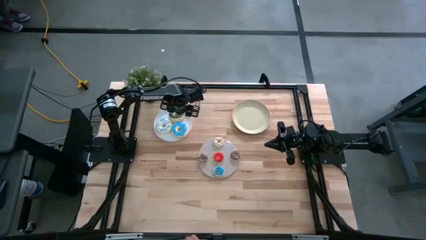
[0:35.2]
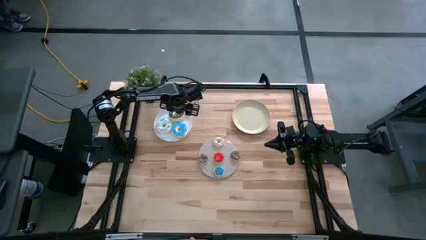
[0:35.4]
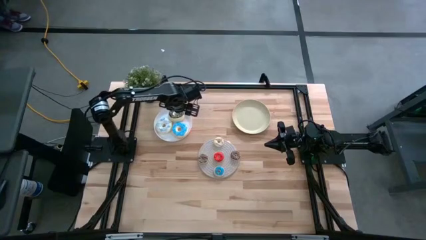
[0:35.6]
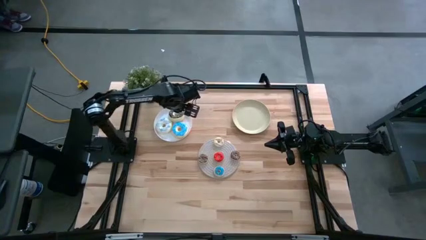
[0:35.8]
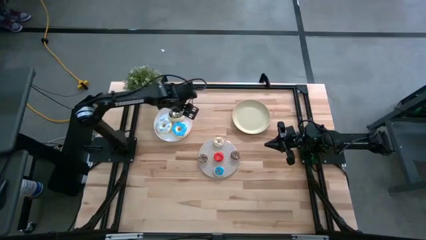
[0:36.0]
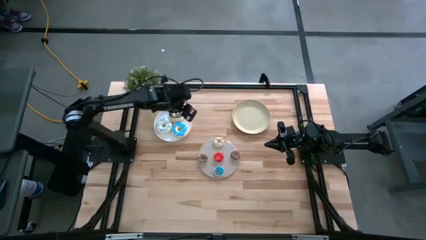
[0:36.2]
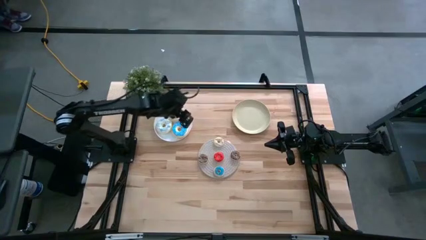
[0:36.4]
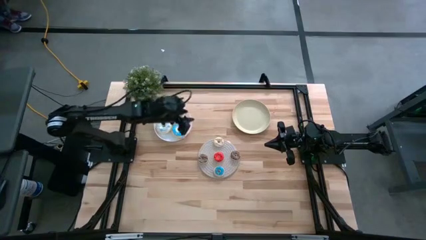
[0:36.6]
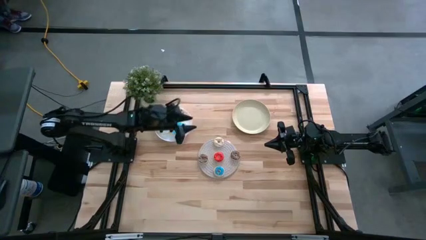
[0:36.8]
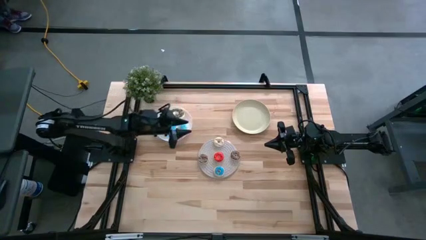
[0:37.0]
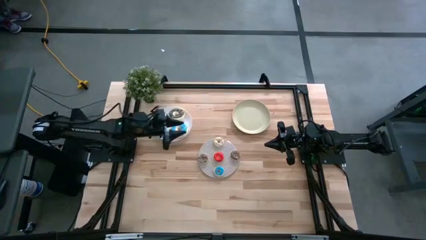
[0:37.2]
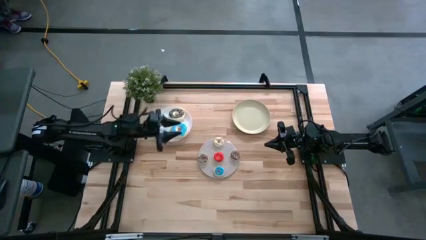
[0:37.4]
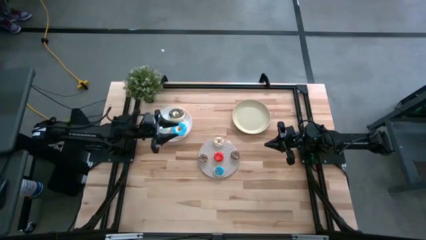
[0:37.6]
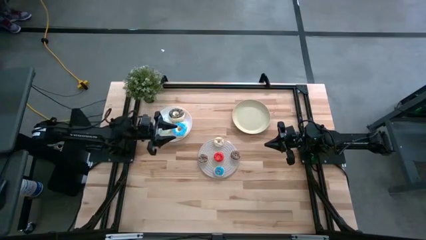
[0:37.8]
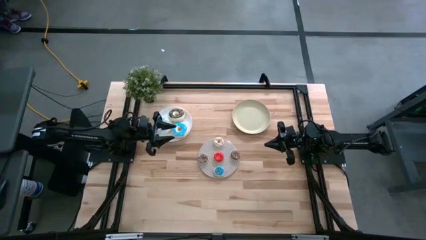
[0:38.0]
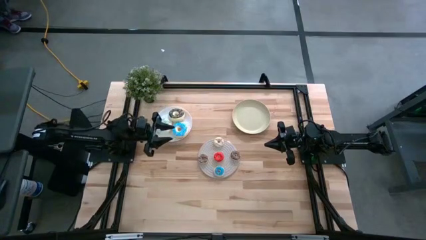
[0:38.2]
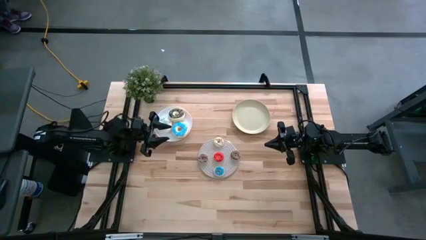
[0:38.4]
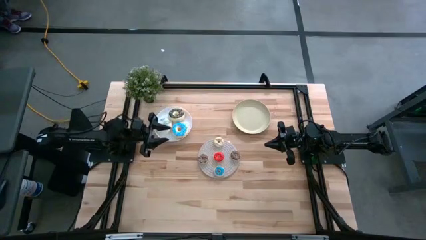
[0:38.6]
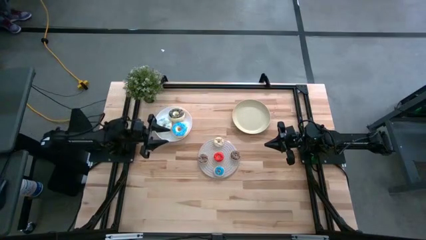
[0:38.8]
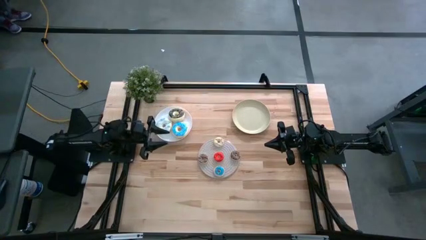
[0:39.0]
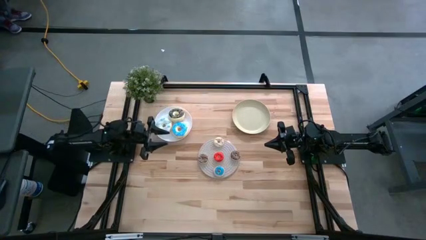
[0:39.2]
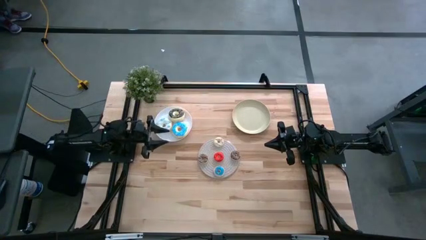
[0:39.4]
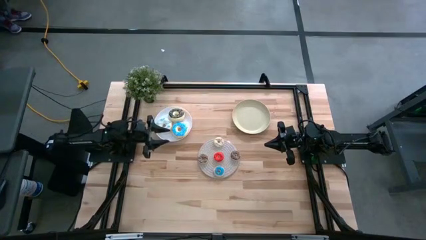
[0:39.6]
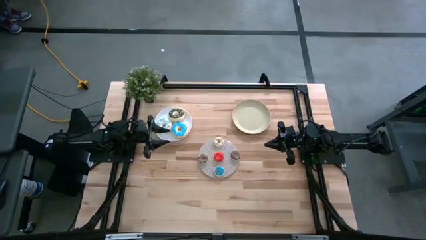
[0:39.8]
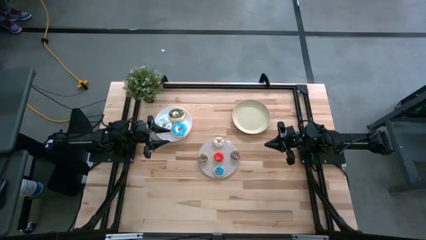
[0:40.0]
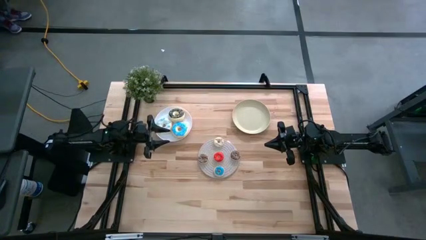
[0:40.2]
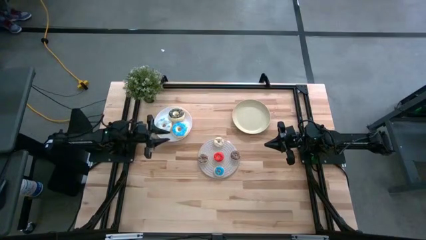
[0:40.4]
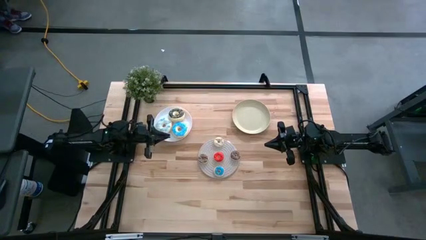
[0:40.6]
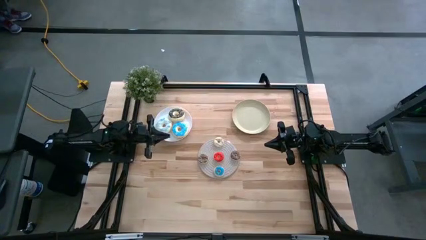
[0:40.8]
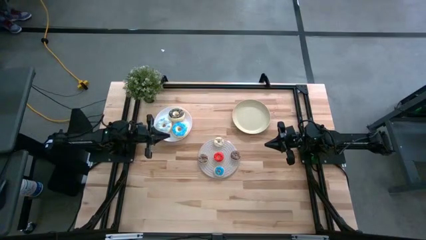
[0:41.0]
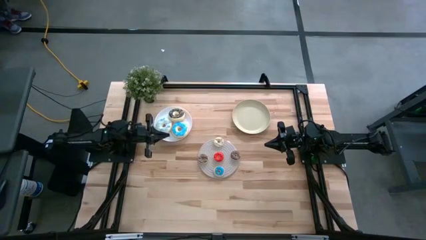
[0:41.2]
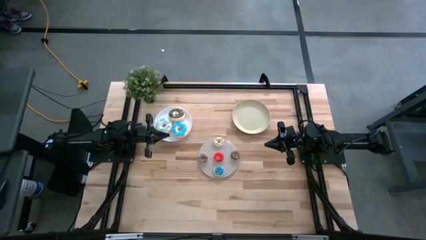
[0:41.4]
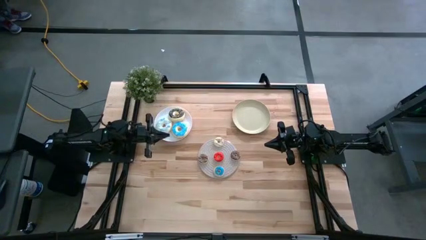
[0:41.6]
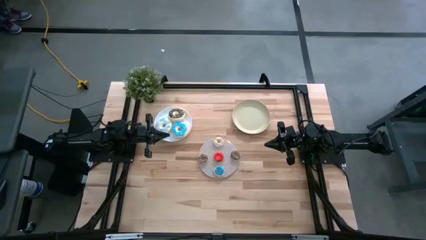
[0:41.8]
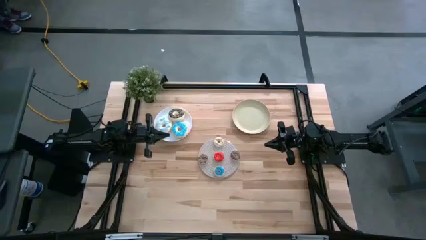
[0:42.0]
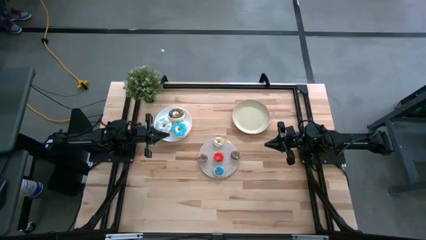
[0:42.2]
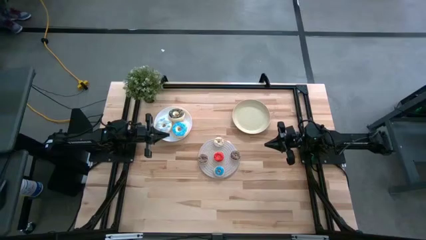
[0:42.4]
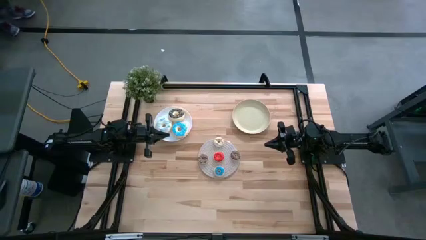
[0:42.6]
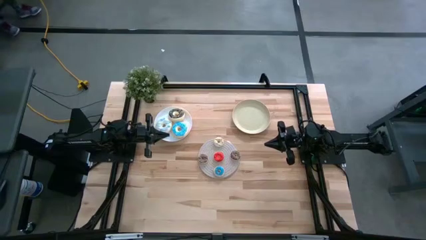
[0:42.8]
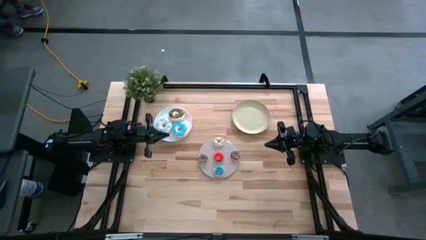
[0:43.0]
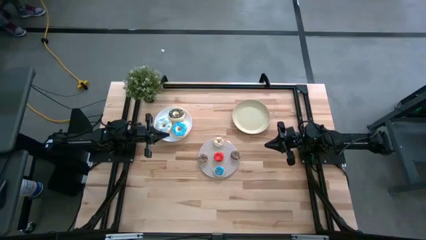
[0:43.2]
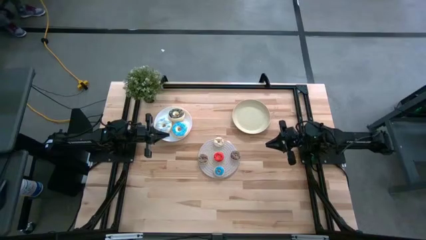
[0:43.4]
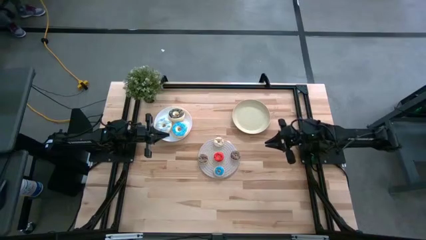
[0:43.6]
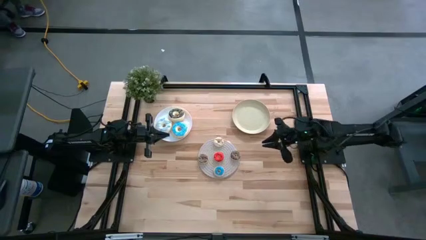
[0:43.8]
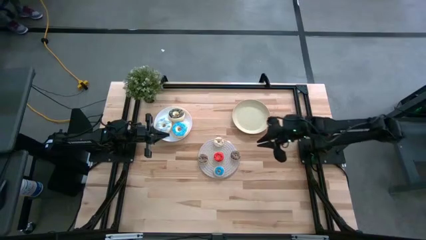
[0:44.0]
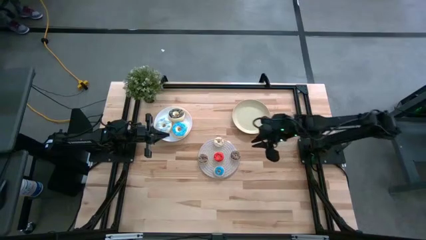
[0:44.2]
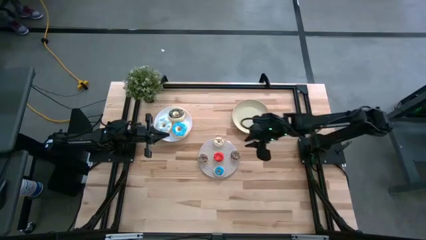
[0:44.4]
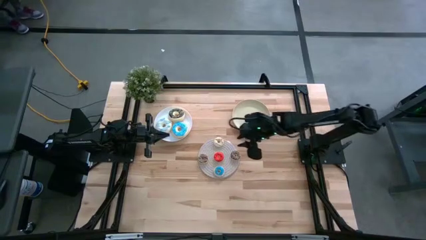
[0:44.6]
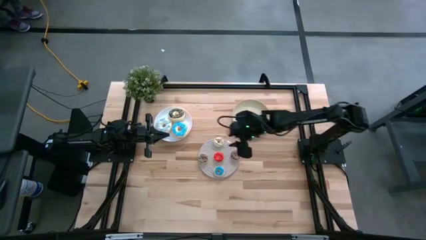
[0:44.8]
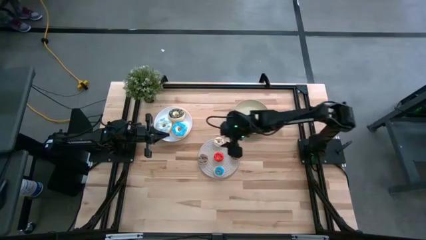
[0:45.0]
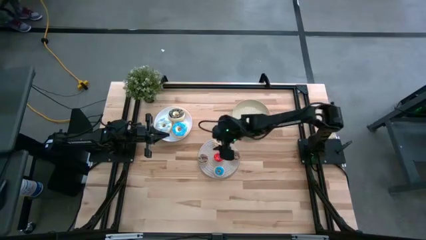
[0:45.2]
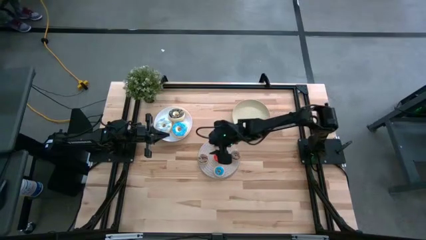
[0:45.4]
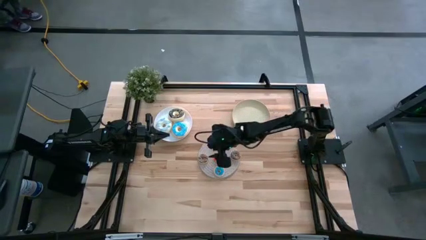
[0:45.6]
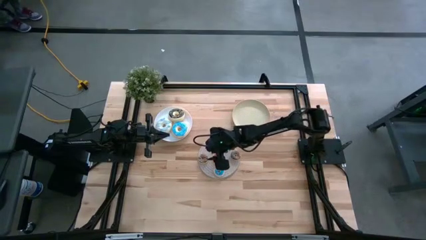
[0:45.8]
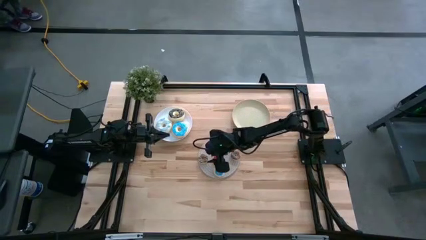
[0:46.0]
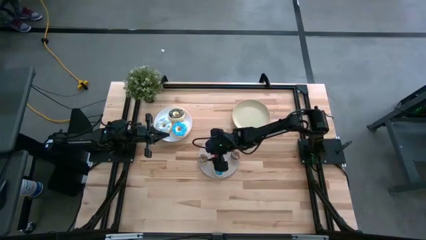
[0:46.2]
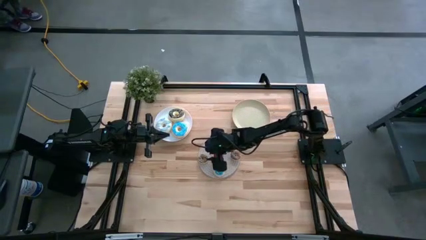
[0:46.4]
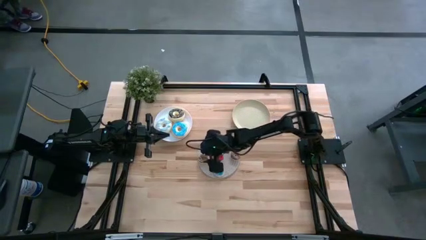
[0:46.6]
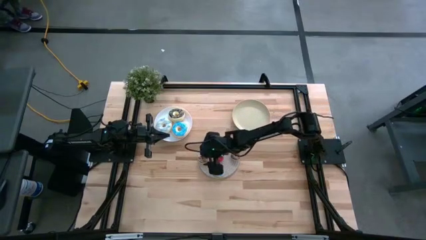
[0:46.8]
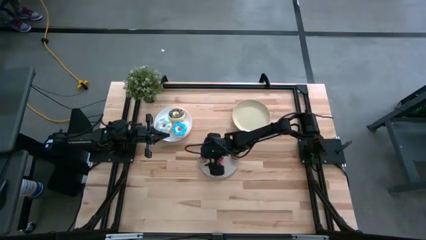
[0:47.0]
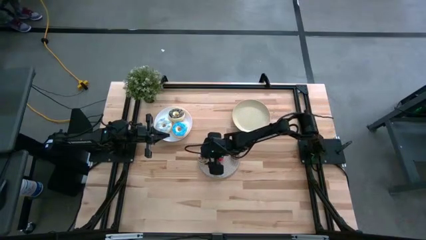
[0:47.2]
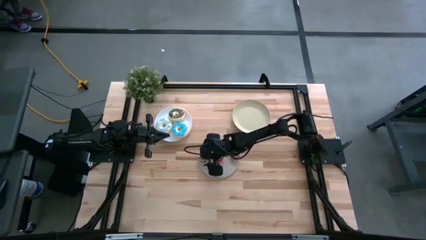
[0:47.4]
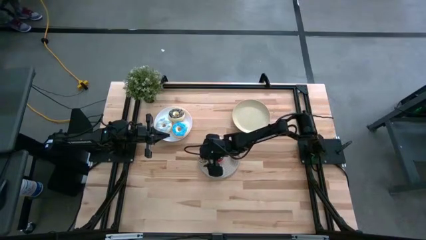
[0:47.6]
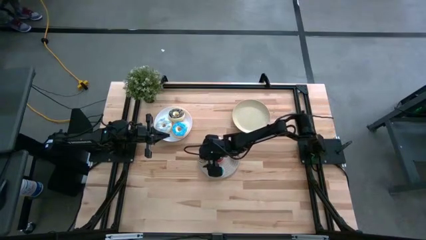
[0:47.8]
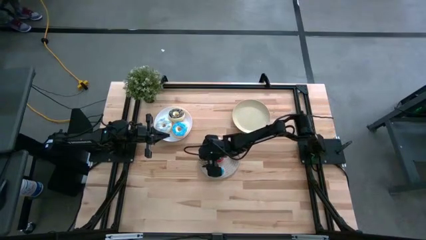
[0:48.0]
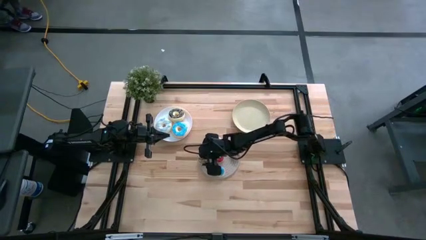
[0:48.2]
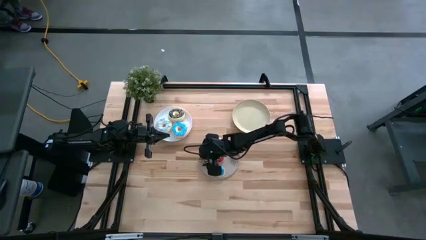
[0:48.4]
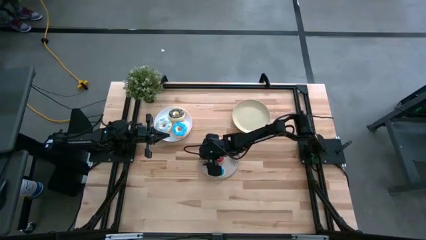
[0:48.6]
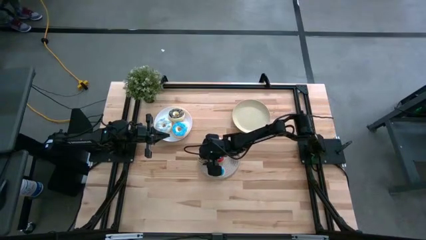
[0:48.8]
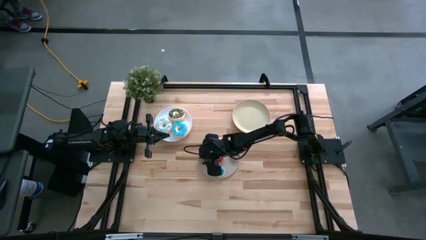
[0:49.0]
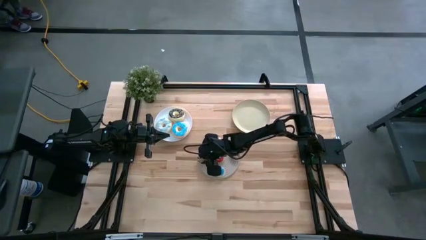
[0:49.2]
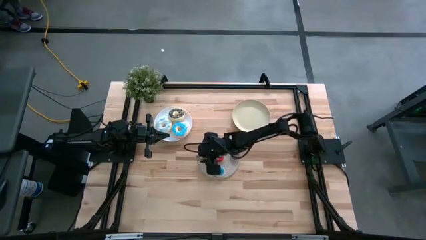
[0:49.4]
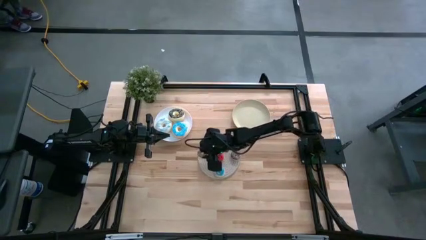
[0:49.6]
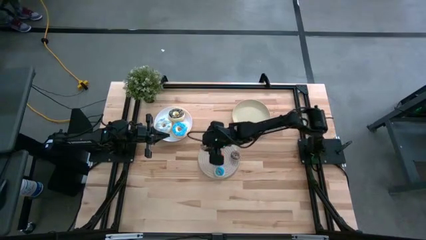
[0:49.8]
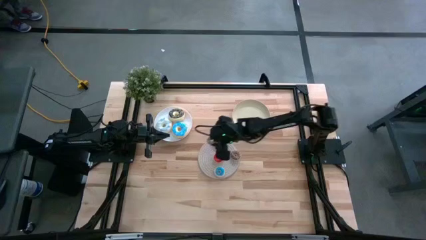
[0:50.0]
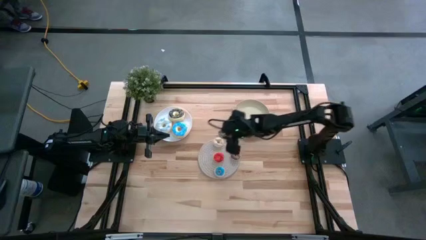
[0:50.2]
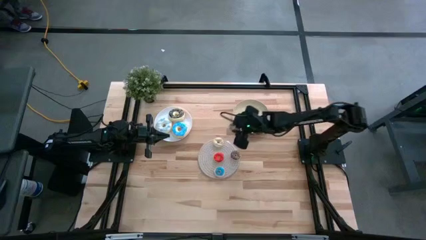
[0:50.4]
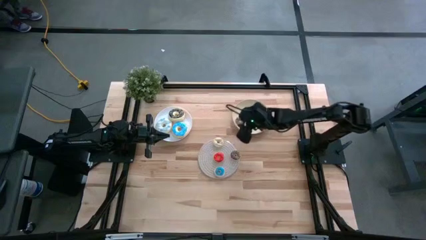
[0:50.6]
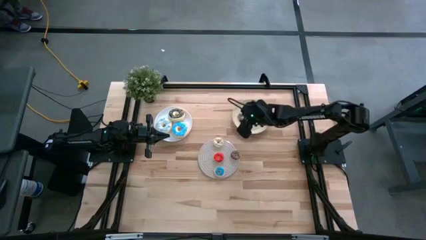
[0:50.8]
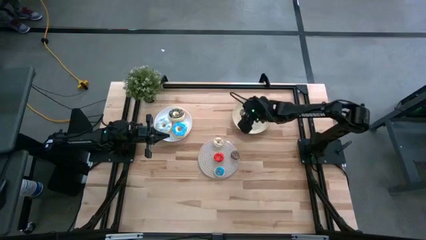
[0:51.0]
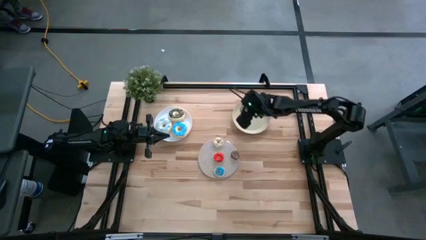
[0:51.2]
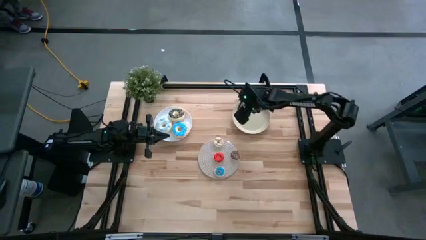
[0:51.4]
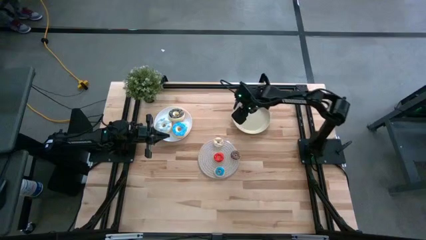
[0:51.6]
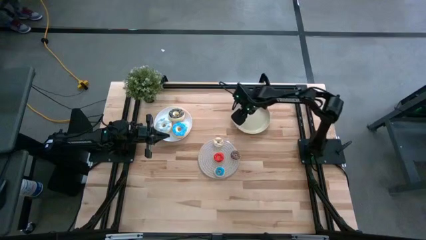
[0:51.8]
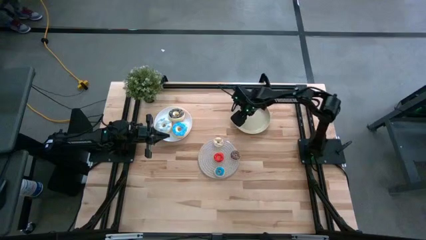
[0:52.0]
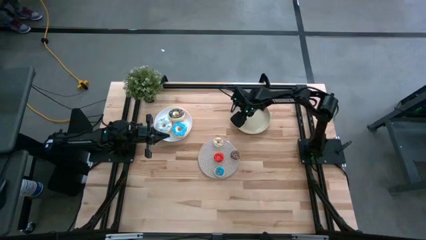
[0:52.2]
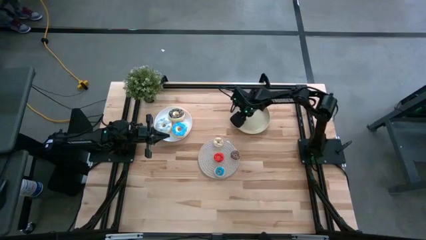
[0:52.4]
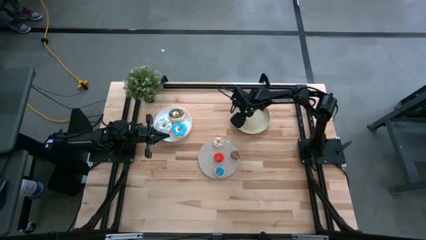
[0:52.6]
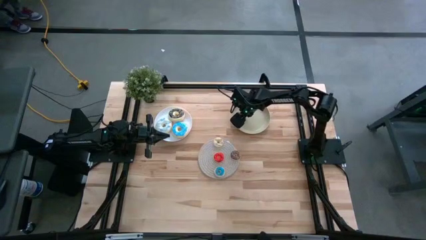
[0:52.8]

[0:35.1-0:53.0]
Task: Pick & Place donuts
Put the small chocolate brown donut on the brown plate
